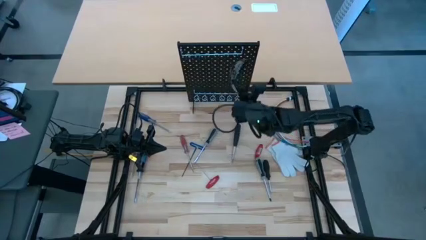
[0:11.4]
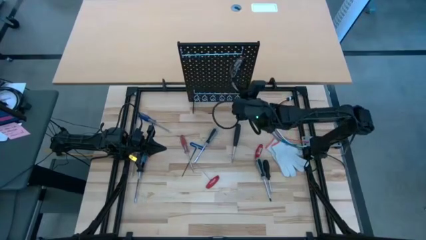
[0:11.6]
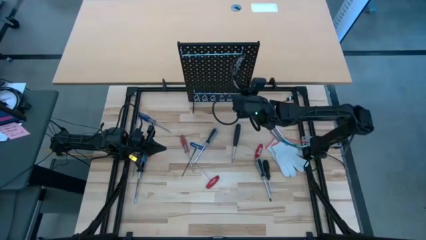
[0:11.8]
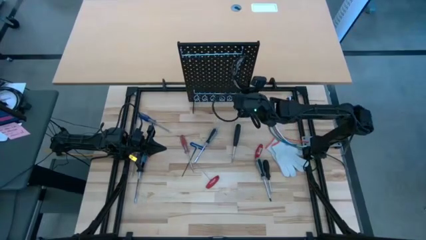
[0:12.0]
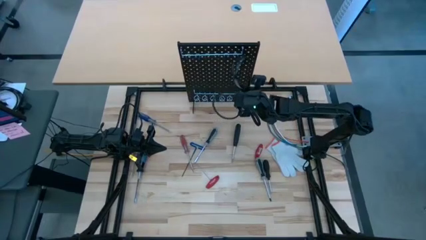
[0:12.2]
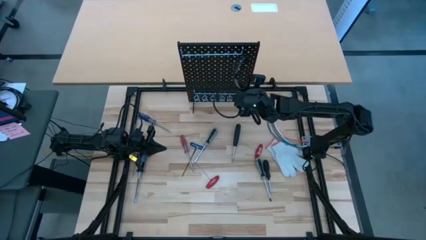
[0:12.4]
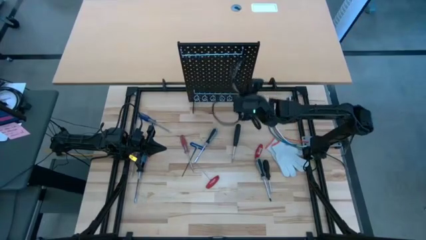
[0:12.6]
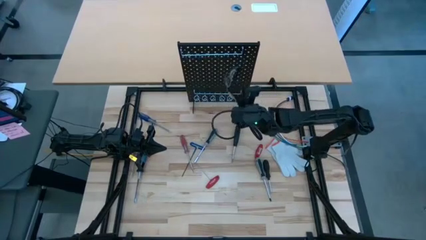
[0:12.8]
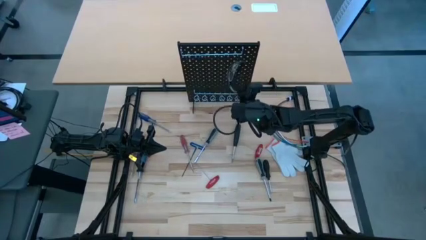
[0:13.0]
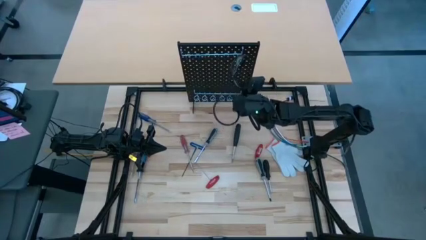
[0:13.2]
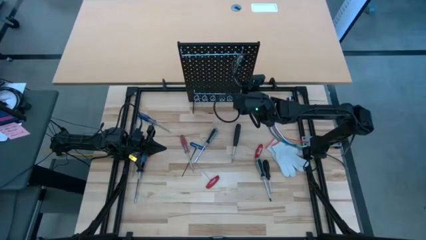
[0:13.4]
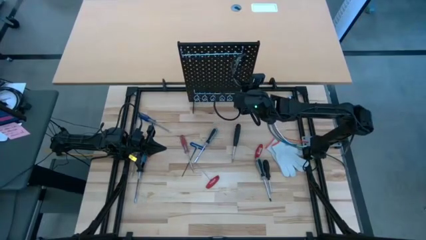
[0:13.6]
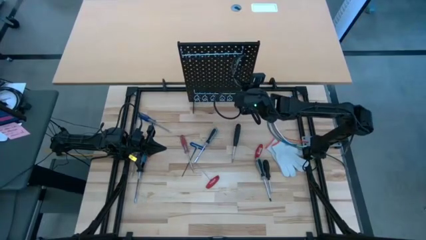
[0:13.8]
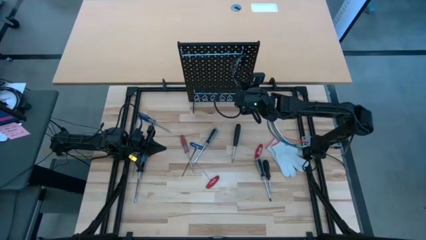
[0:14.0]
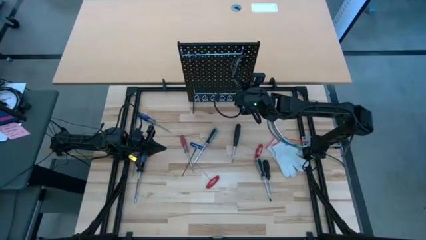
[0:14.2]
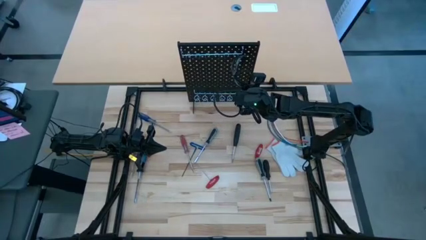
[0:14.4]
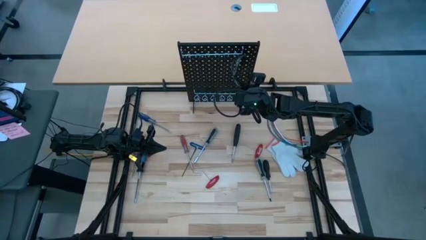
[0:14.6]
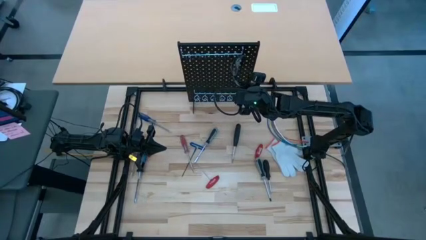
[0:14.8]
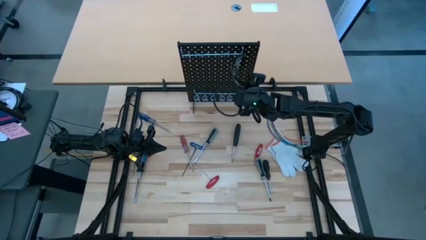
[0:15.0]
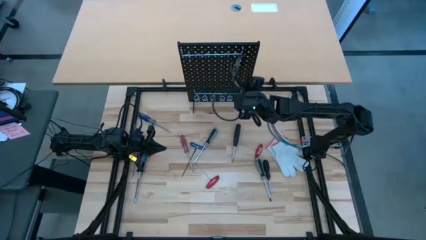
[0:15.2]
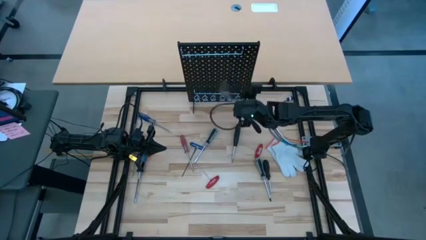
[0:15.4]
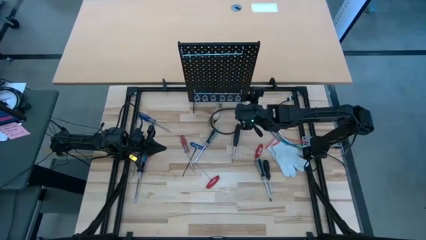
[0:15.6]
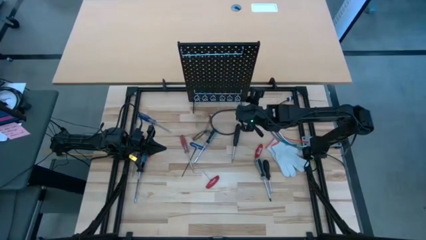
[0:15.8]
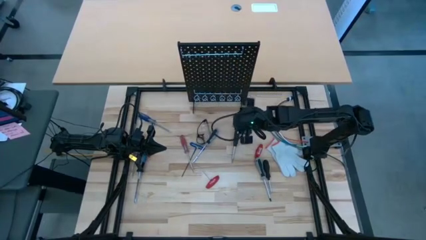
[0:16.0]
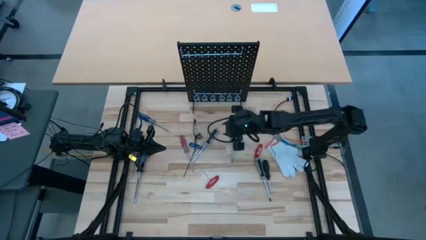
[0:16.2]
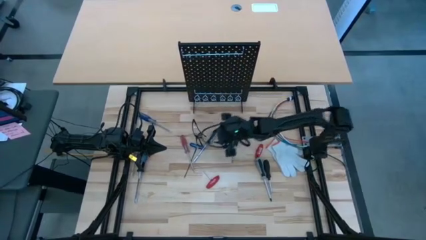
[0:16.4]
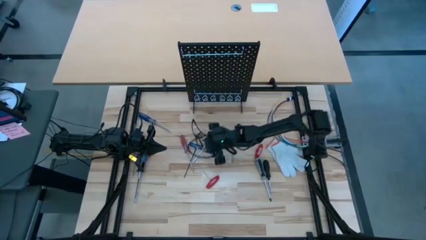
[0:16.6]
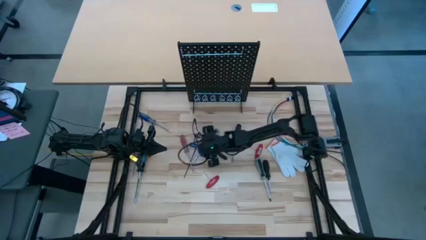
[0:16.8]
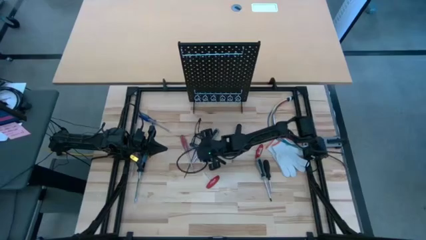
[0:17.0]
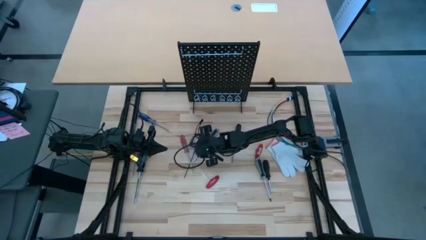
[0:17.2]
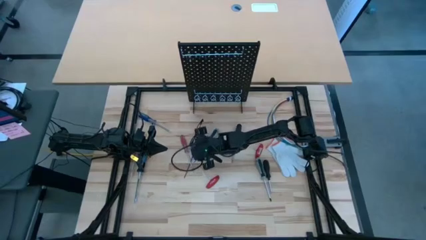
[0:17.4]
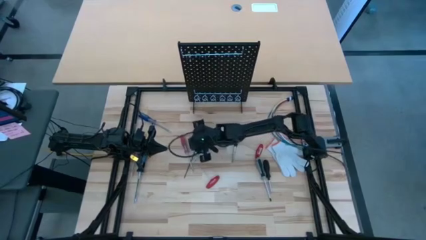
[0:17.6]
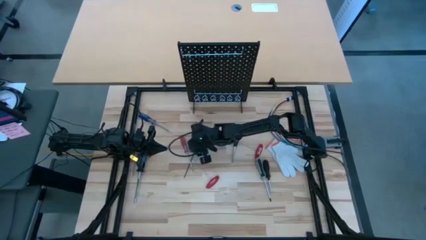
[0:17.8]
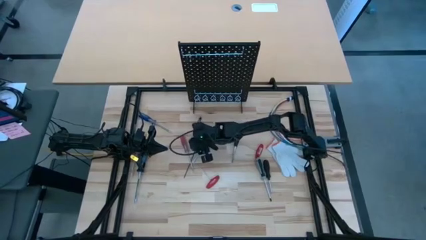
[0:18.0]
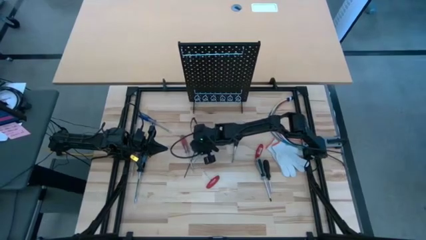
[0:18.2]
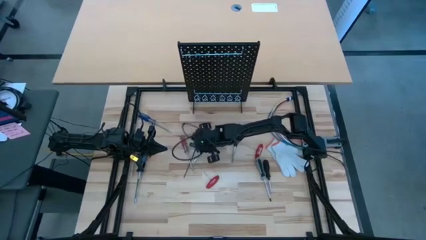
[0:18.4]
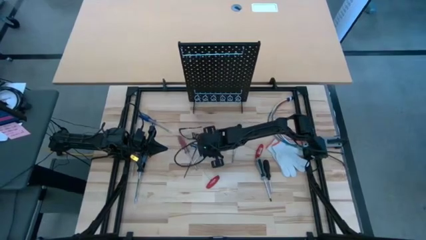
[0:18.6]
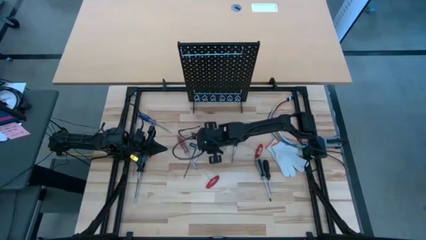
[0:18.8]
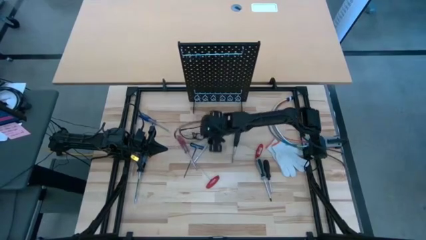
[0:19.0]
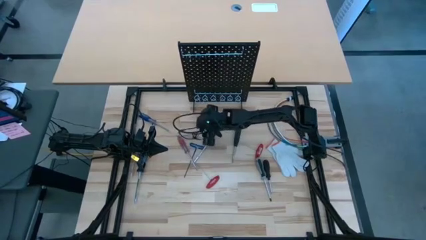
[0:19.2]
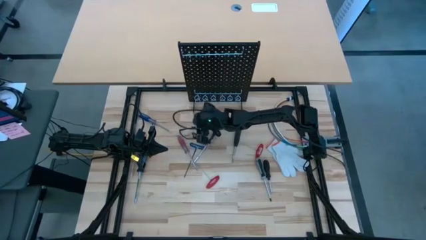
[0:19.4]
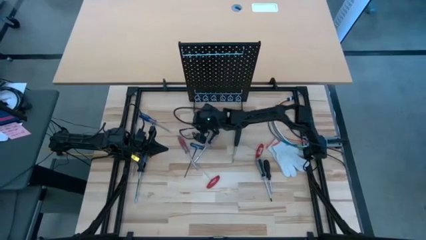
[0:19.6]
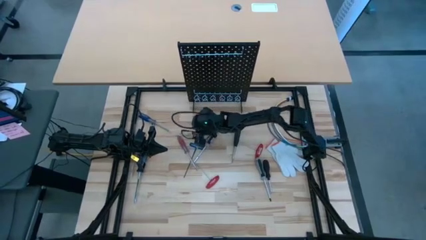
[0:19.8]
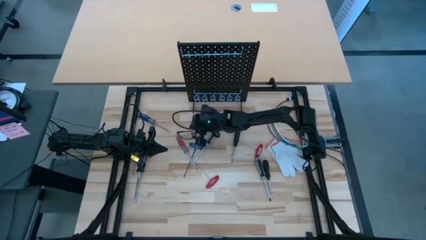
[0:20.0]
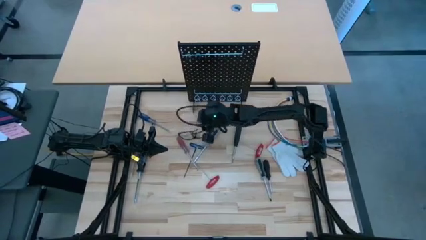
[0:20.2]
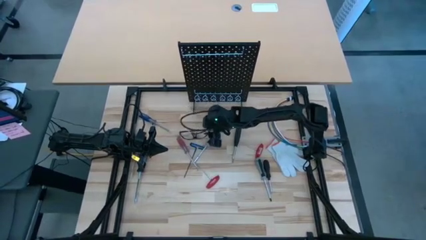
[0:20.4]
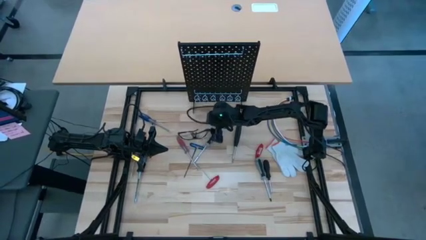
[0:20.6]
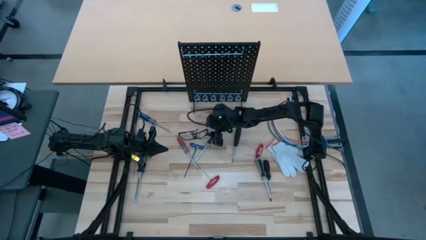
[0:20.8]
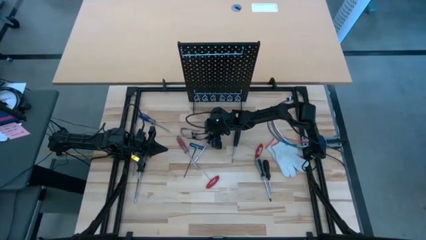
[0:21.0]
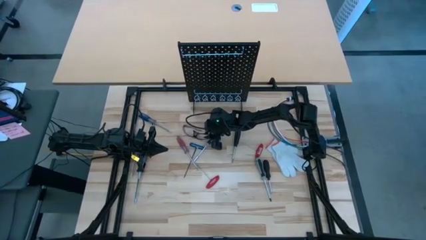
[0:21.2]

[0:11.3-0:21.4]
Task: Hang tools onto peg board
Hang the clear safety goggles on the pegboard

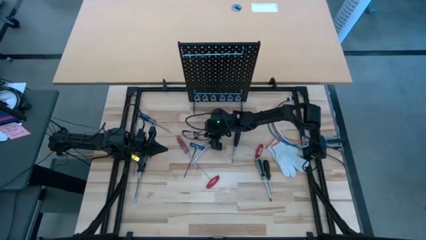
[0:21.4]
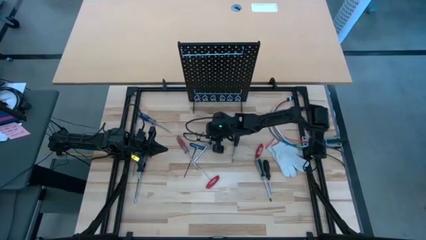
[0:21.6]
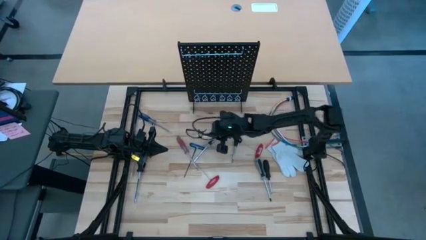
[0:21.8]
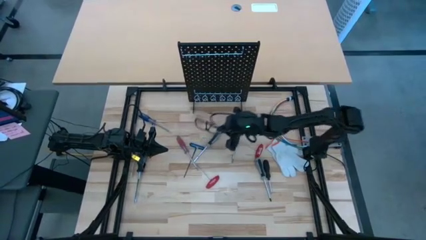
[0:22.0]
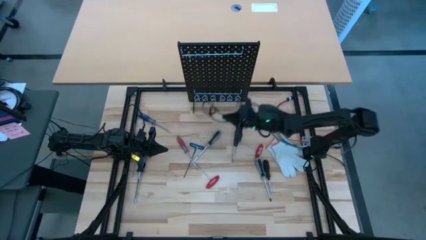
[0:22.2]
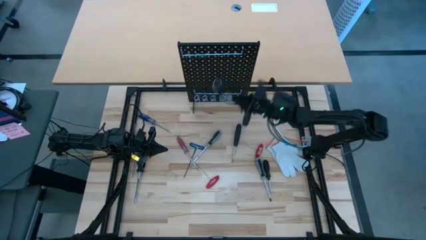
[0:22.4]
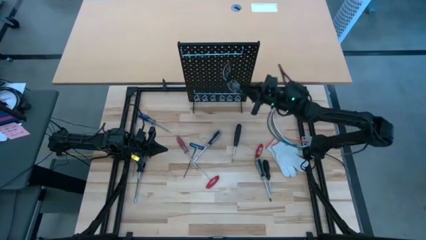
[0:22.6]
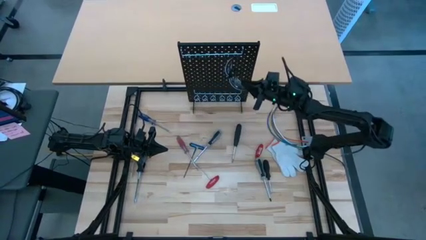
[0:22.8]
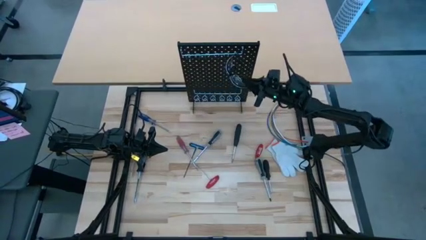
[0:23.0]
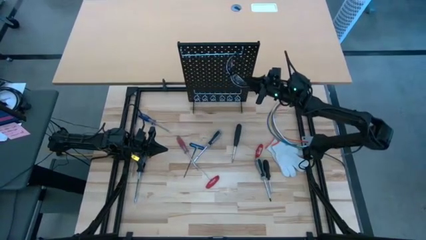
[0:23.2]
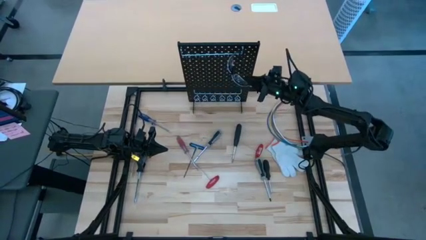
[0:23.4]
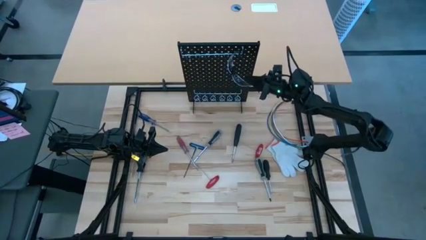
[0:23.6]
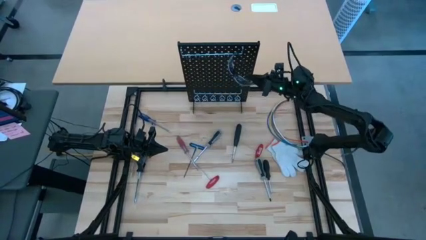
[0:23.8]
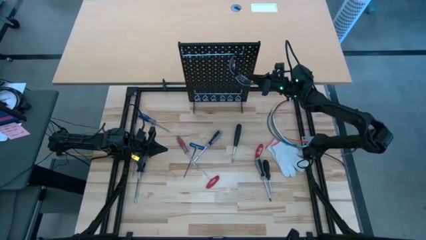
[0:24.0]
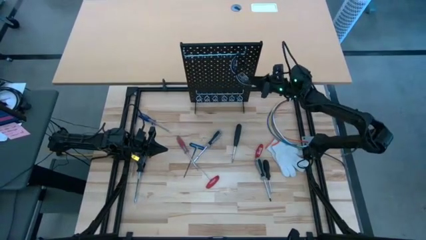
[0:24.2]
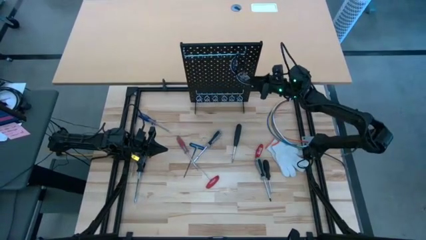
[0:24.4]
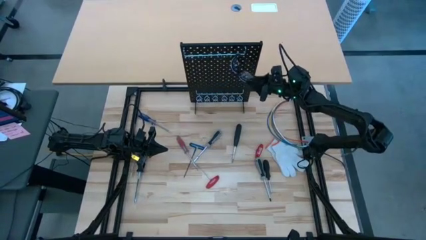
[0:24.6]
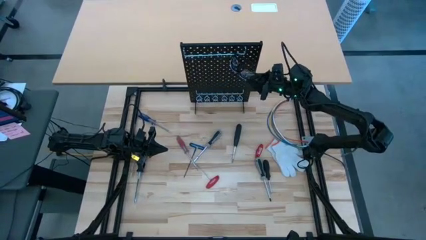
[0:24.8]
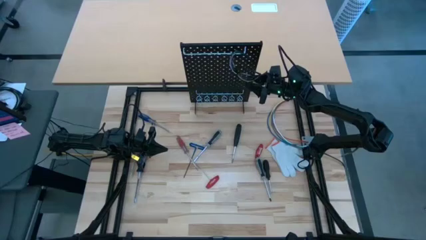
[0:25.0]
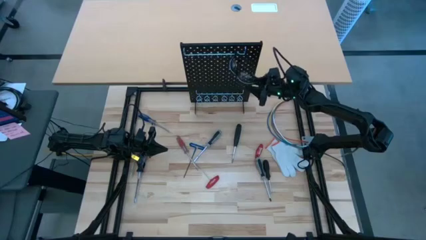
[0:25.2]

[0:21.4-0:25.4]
Hang the clear safety goggles on the pegboard
